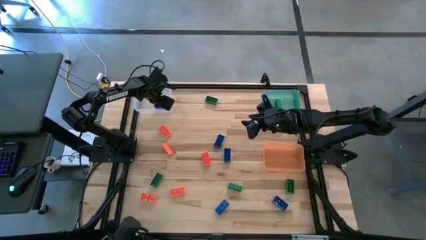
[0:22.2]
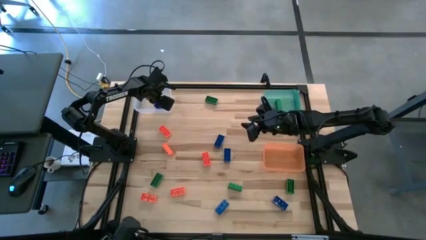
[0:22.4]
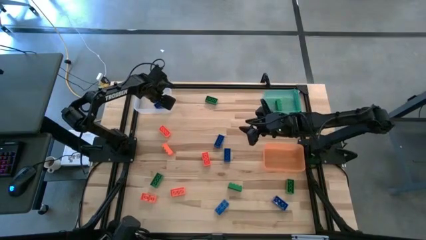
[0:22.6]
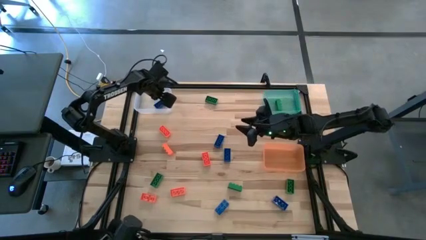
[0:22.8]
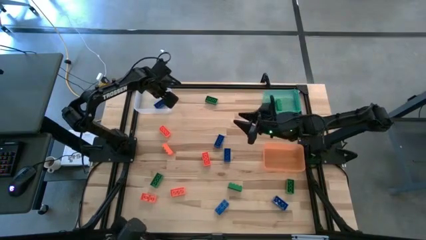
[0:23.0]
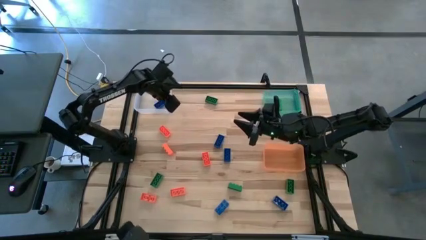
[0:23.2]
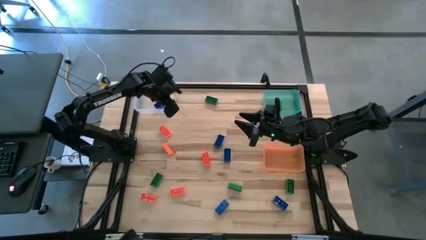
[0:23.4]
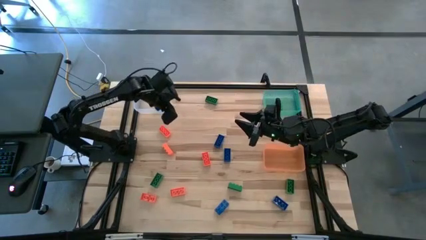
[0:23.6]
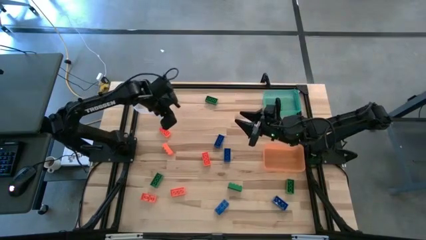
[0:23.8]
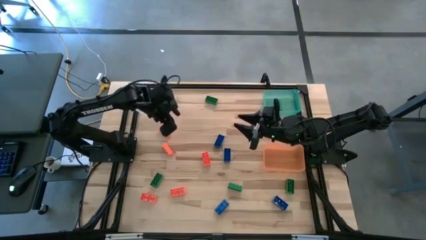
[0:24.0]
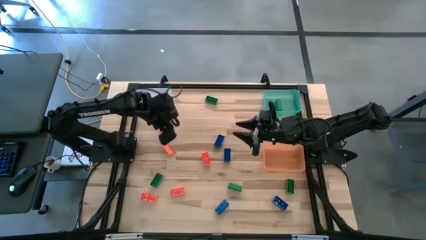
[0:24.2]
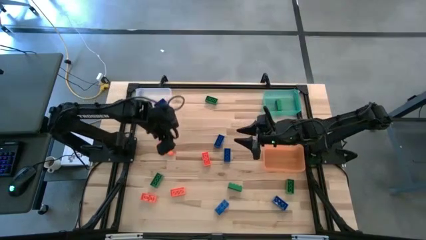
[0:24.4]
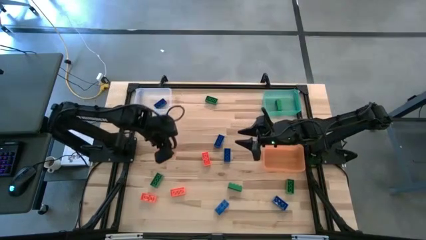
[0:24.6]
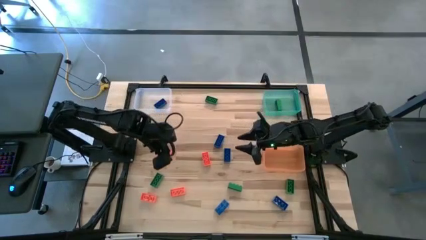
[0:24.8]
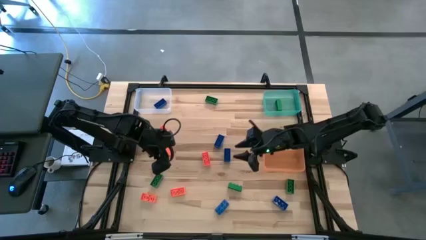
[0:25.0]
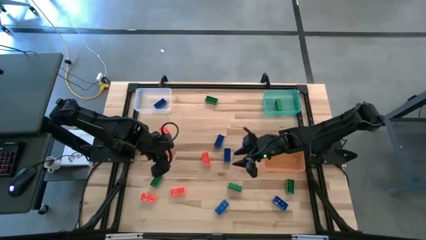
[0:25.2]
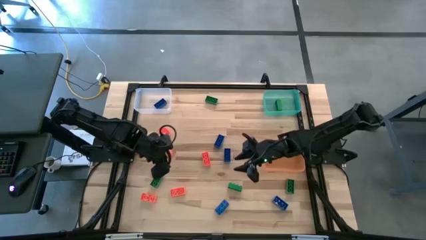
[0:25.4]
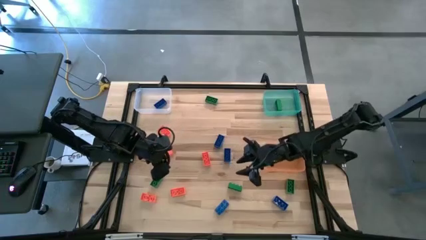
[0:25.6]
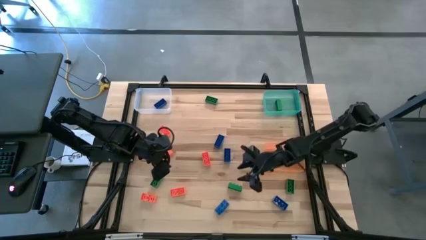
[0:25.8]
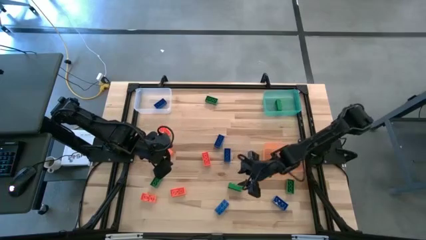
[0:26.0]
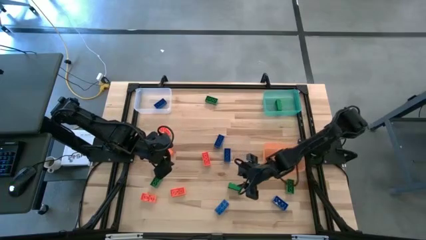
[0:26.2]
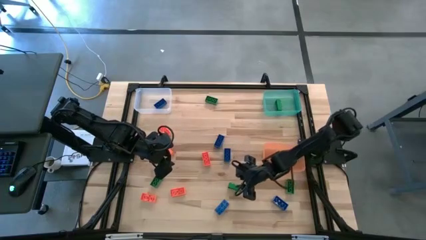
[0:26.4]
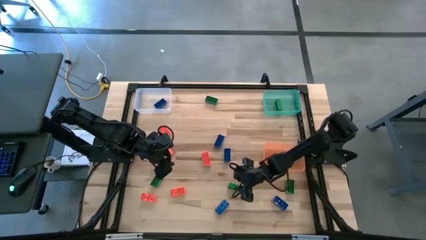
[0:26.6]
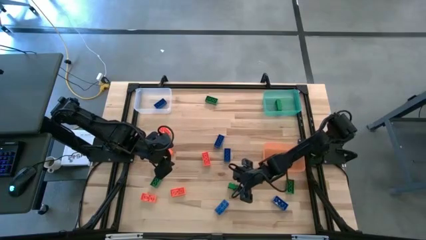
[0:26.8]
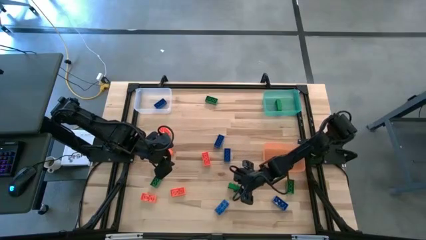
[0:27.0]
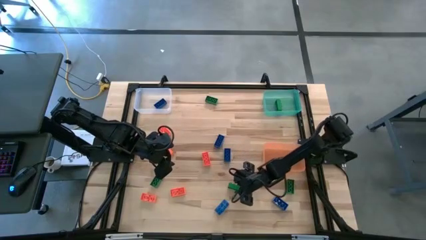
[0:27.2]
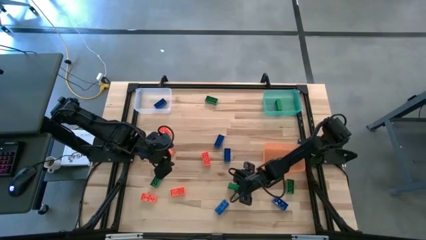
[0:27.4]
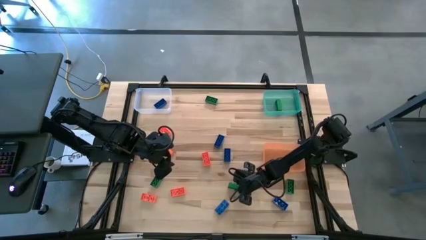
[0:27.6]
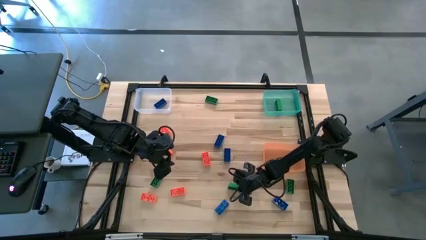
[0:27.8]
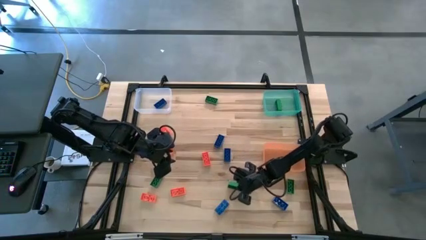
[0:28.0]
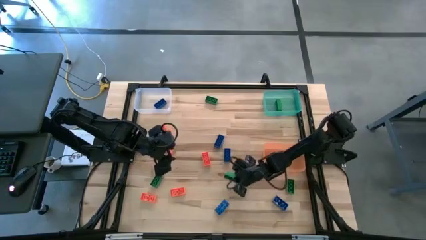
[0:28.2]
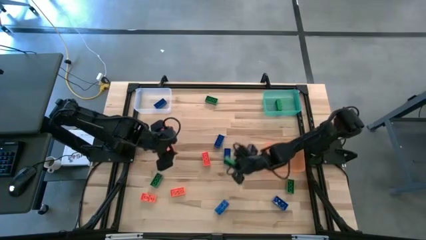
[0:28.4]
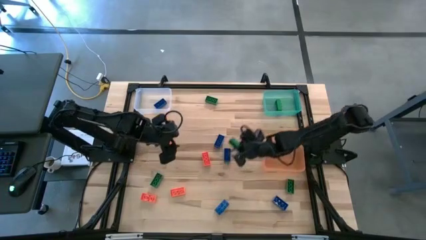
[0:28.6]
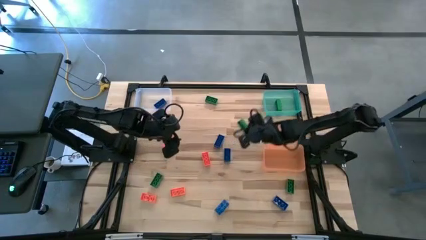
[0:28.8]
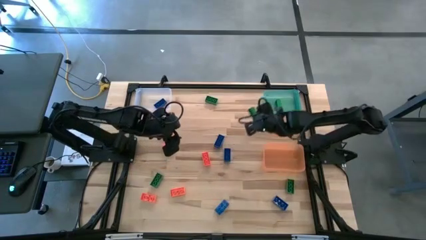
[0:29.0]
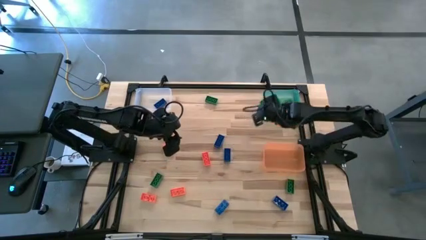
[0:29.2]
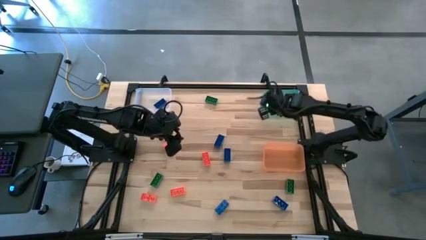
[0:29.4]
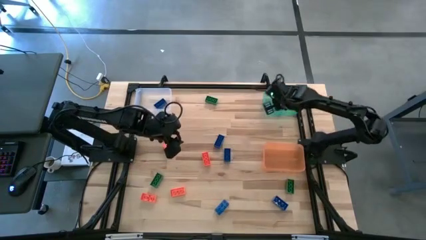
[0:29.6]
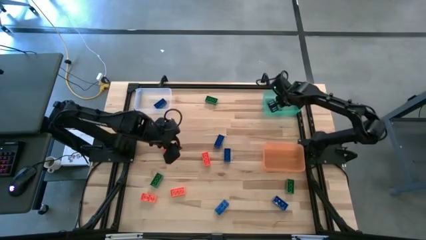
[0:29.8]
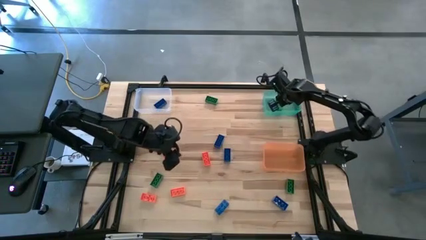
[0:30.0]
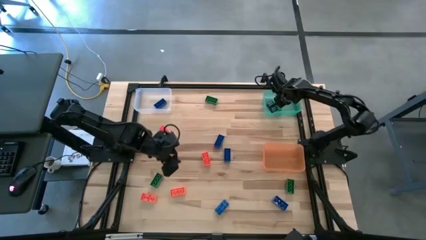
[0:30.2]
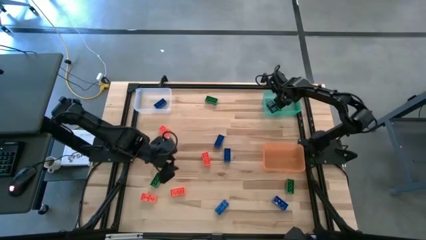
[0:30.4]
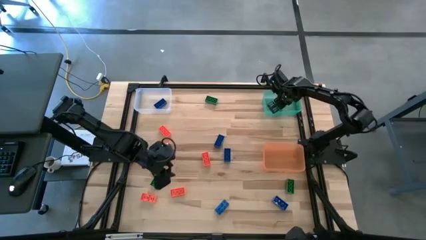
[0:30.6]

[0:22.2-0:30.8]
Task: Sort & place blocks by color
Put the green game piece into the green bin

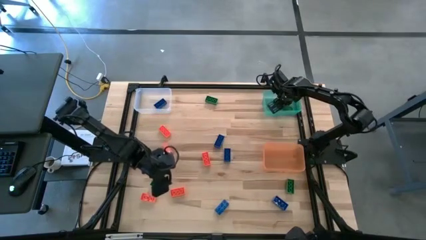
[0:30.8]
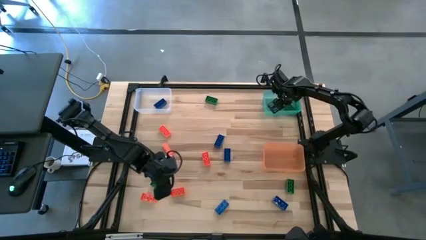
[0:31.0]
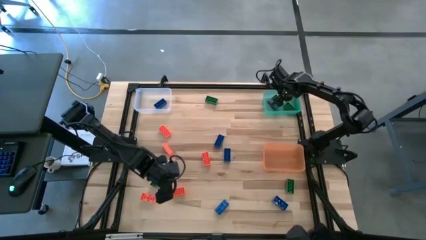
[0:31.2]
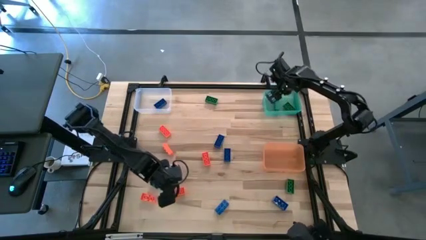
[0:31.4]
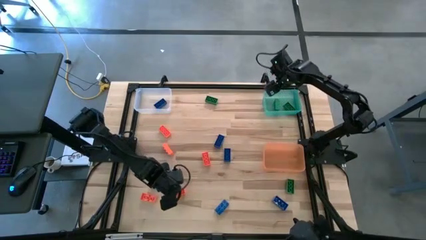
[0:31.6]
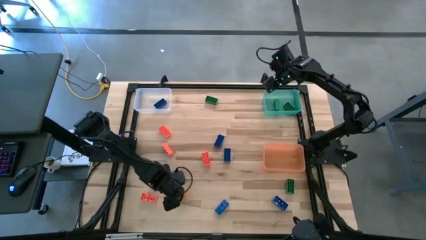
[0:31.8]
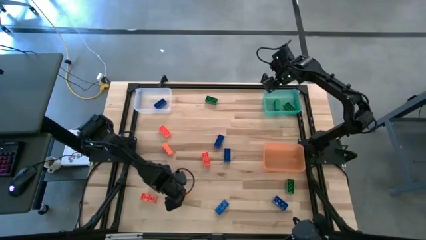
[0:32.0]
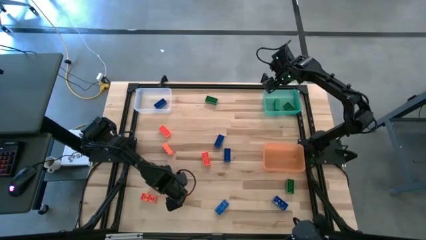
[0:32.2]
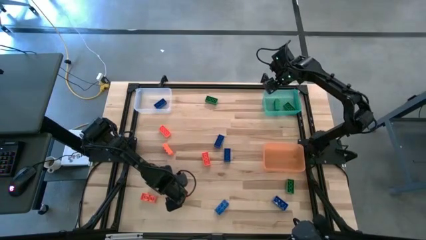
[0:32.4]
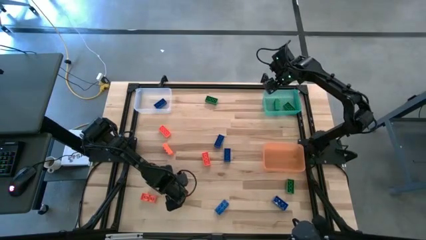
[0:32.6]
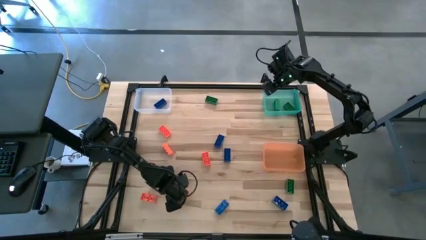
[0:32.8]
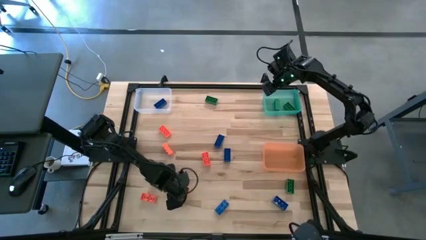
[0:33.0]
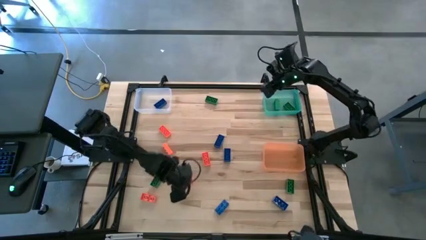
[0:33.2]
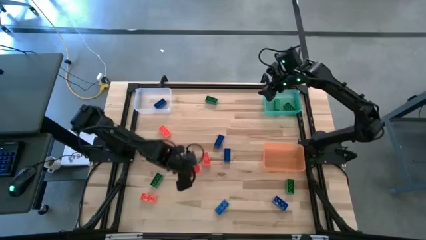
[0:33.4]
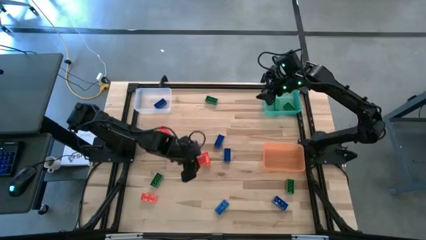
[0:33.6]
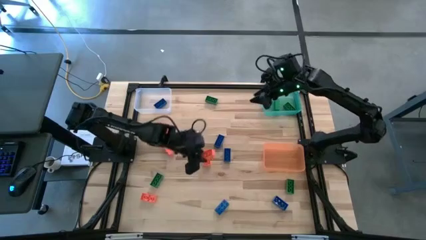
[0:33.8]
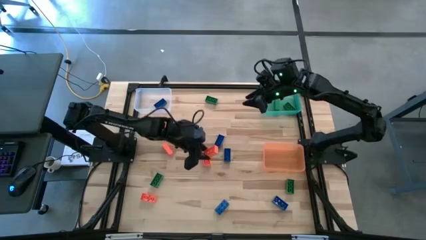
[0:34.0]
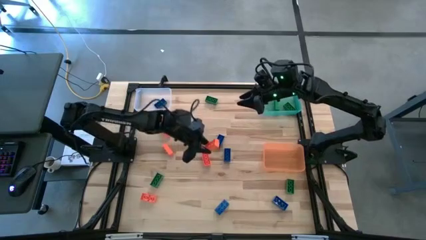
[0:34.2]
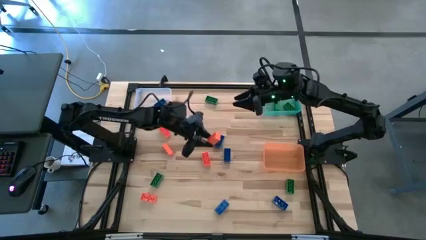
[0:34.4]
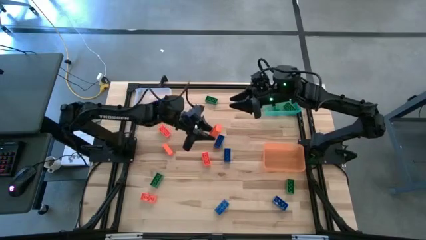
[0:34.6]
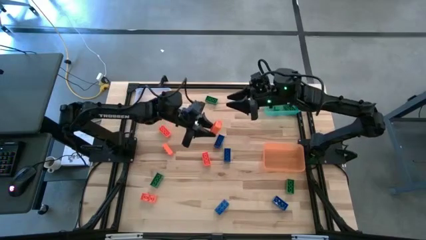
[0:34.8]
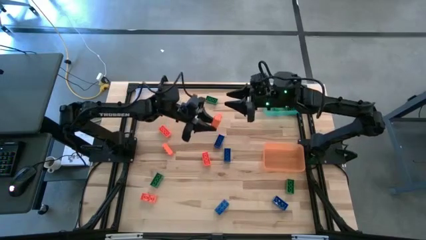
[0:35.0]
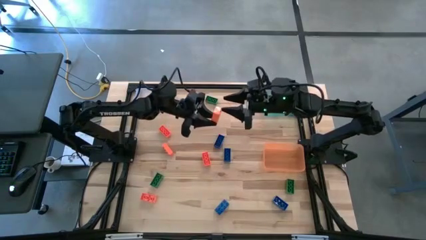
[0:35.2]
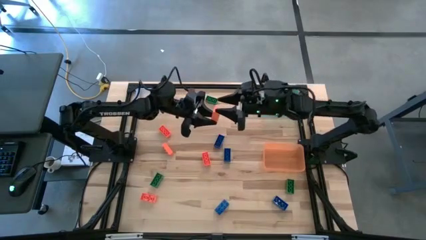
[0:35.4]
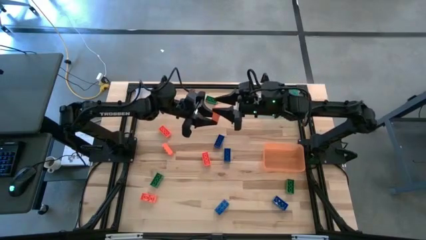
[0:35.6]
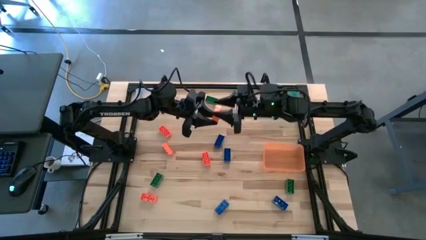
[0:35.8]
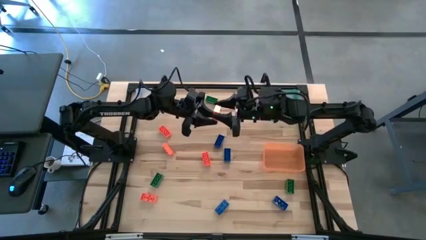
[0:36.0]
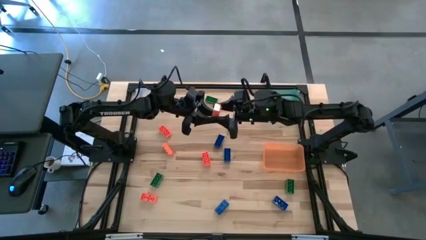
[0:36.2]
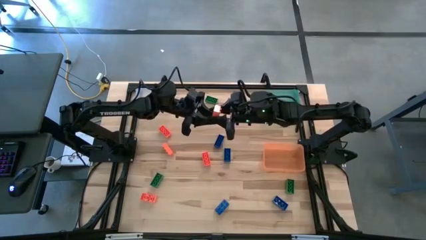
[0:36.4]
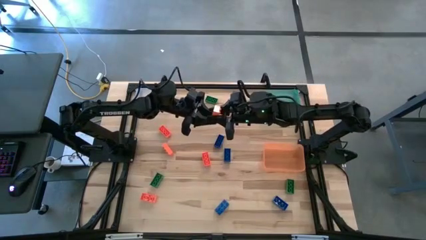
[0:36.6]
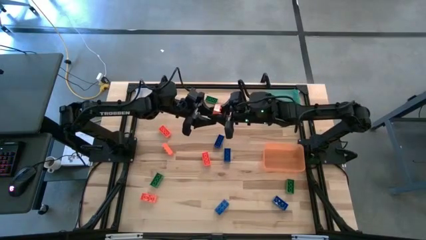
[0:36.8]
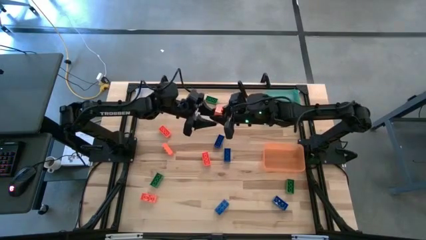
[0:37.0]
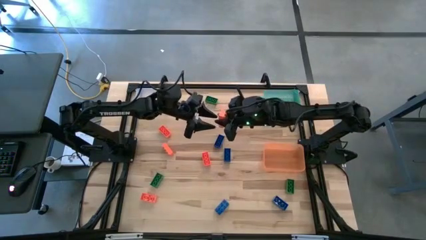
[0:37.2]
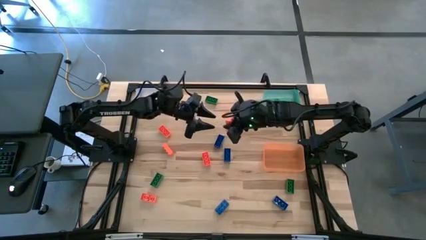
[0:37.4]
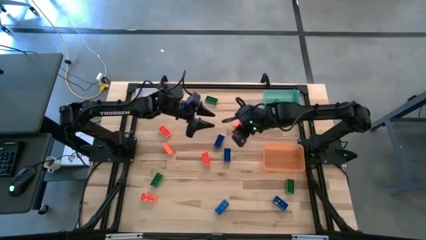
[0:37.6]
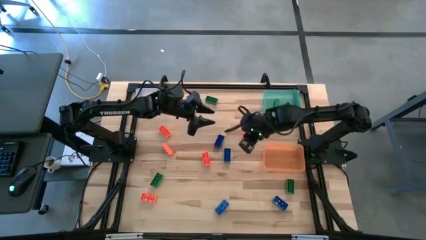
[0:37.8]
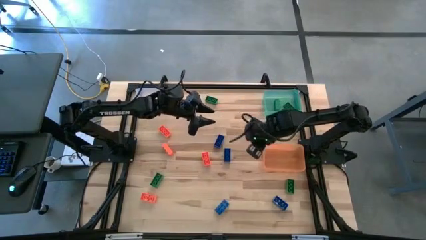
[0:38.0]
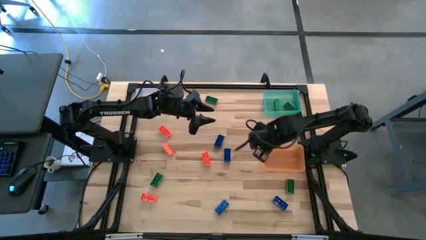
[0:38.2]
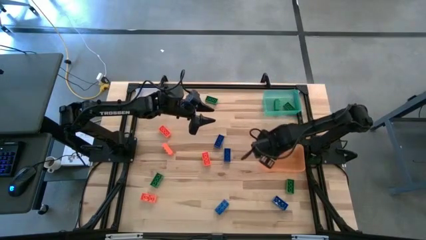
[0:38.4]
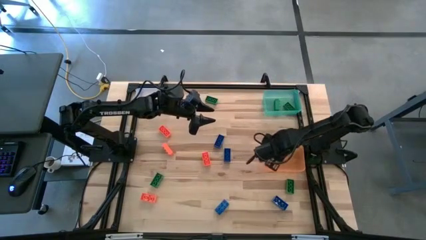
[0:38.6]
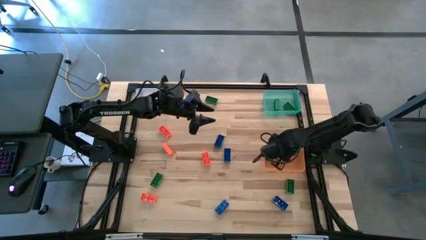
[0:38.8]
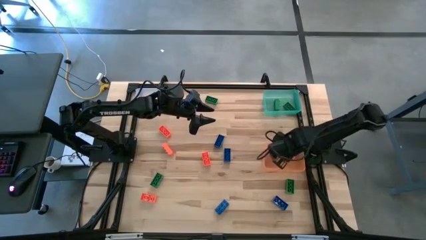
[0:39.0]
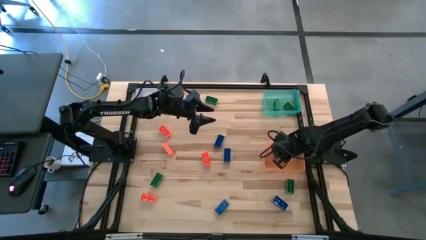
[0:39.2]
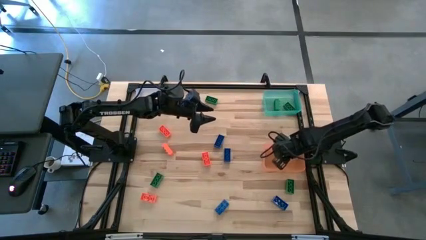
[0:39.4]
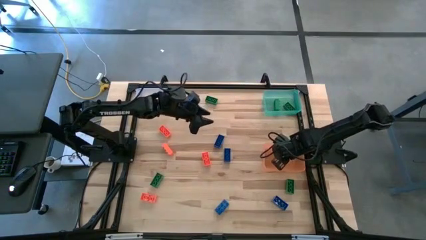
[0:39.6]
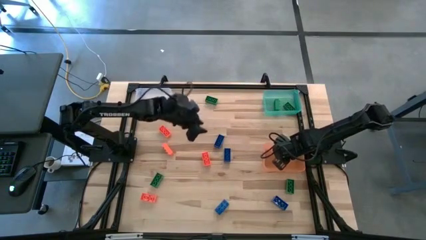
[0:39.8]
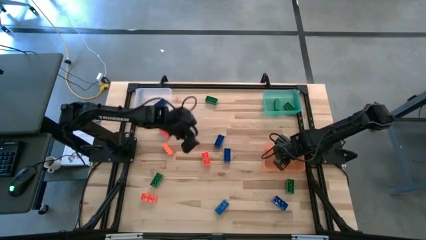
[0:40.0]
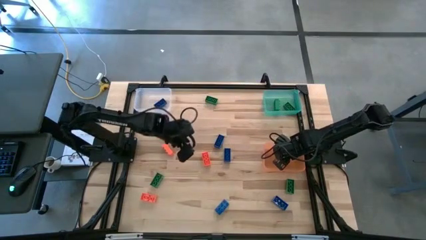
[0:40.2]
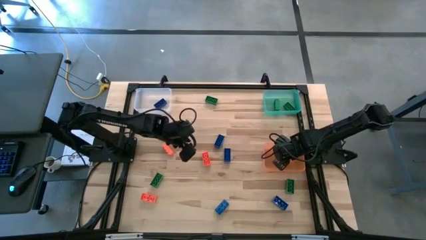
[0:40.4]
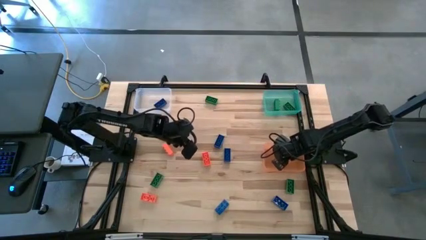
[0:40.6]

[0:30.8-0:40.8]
Put the orange game piece into the orange bin
